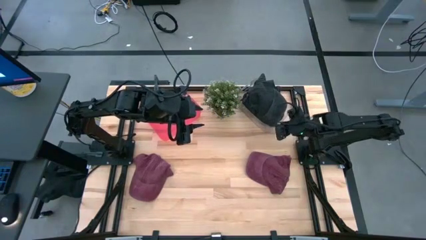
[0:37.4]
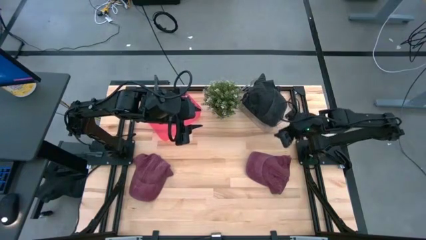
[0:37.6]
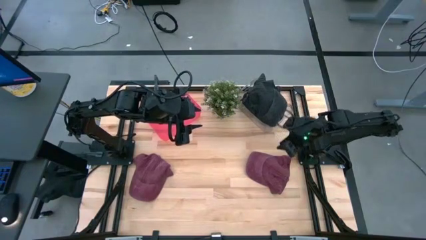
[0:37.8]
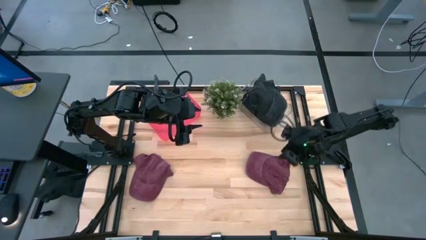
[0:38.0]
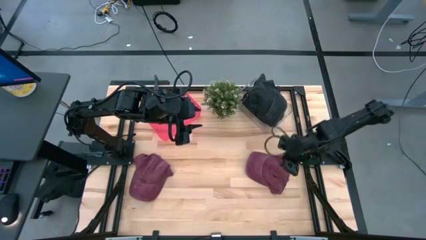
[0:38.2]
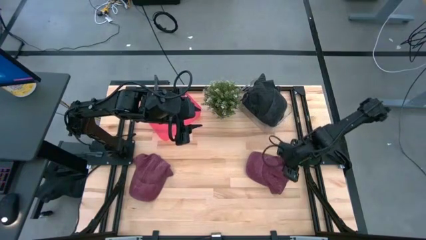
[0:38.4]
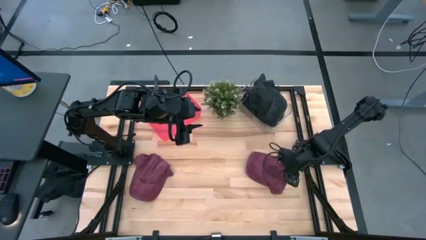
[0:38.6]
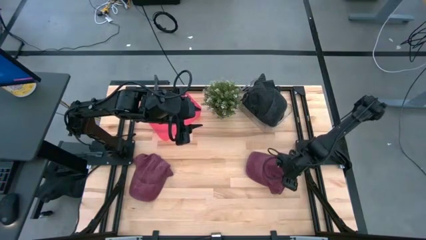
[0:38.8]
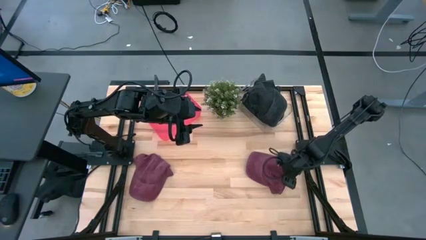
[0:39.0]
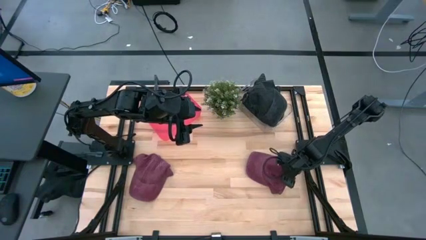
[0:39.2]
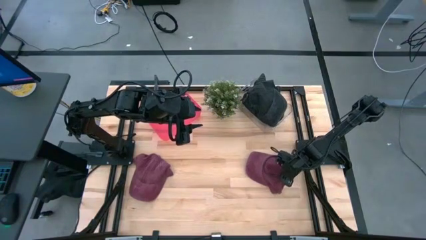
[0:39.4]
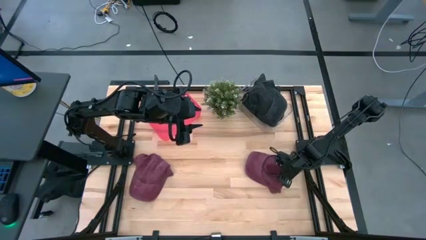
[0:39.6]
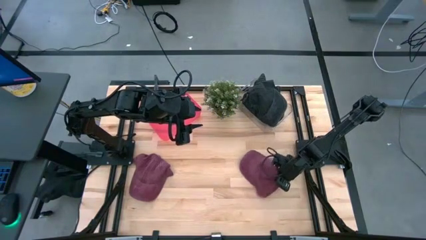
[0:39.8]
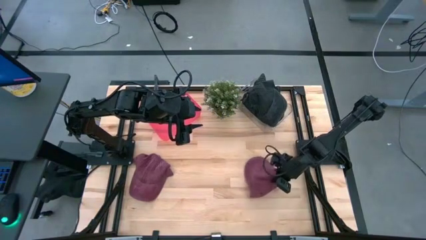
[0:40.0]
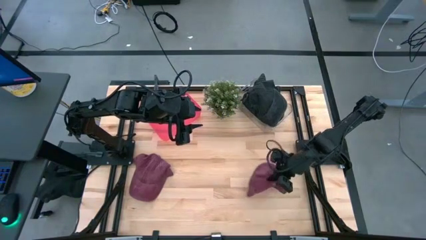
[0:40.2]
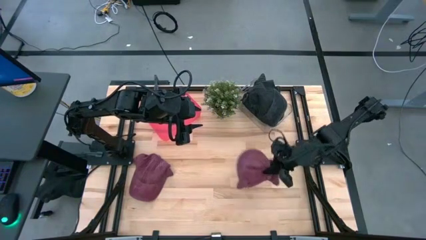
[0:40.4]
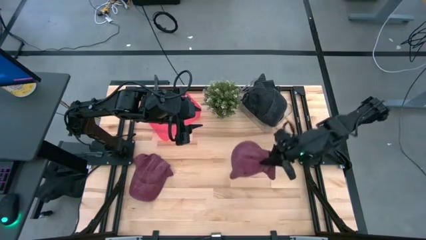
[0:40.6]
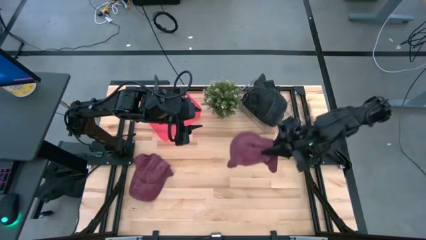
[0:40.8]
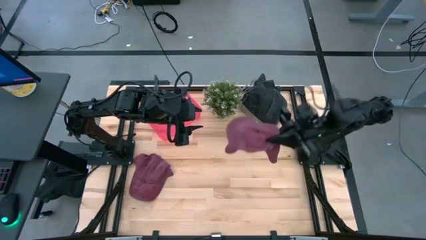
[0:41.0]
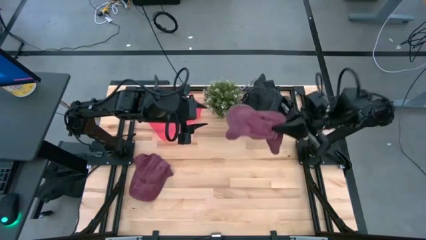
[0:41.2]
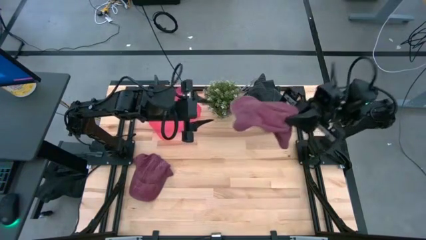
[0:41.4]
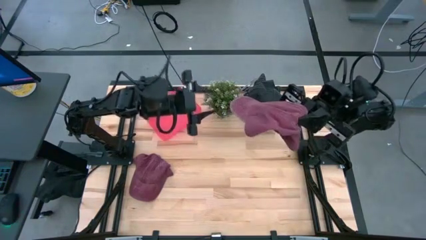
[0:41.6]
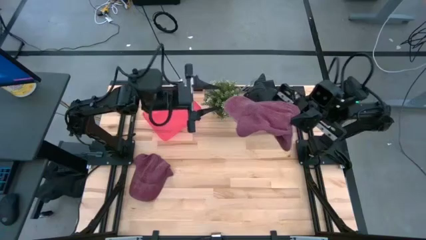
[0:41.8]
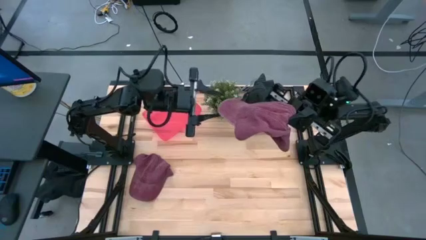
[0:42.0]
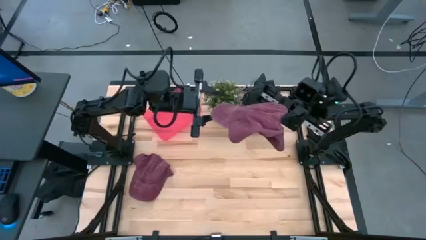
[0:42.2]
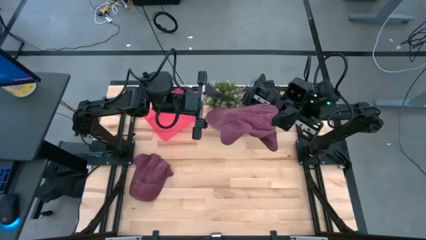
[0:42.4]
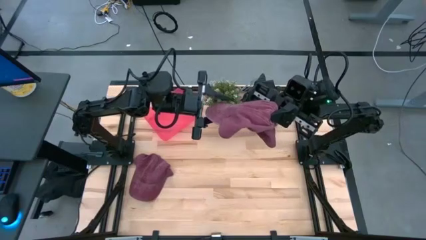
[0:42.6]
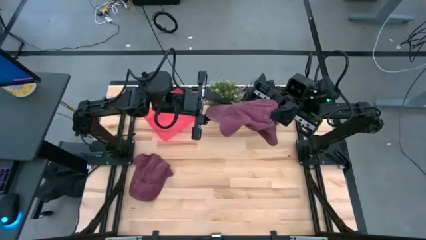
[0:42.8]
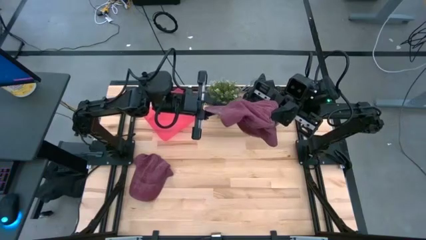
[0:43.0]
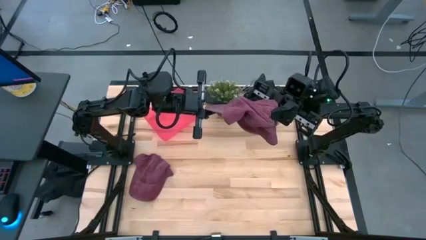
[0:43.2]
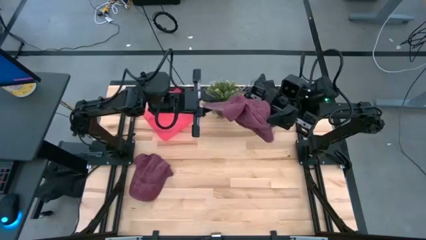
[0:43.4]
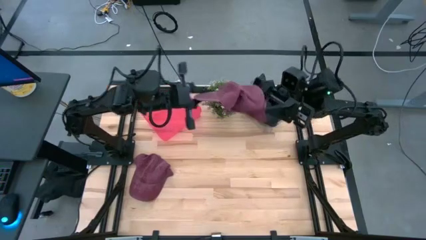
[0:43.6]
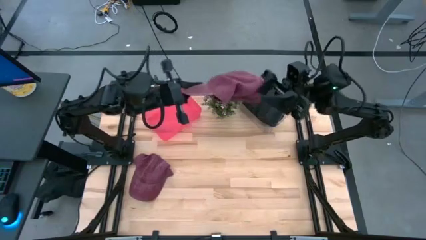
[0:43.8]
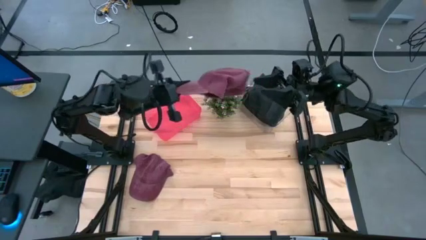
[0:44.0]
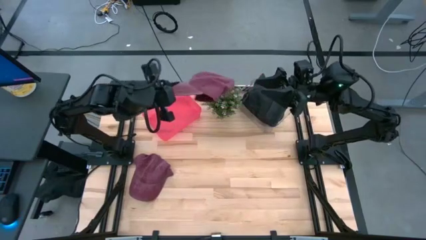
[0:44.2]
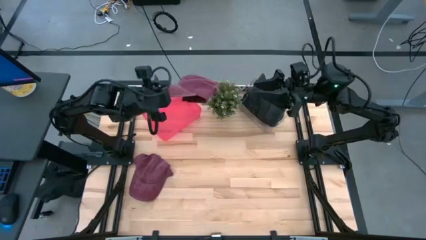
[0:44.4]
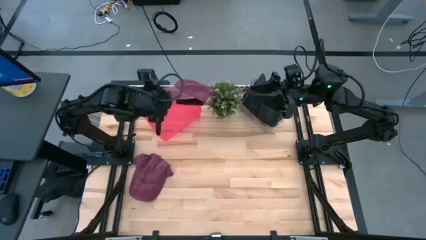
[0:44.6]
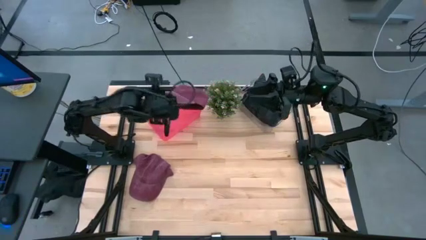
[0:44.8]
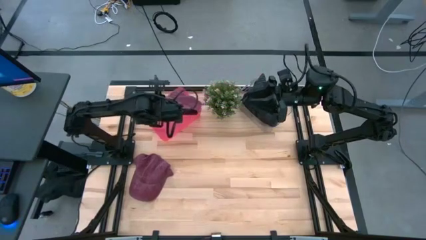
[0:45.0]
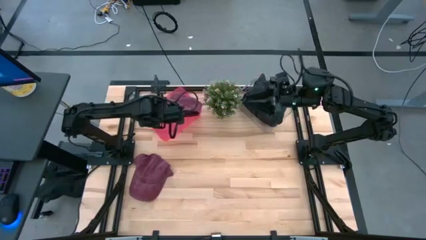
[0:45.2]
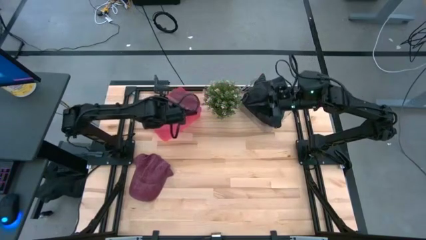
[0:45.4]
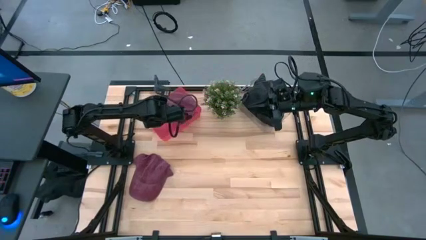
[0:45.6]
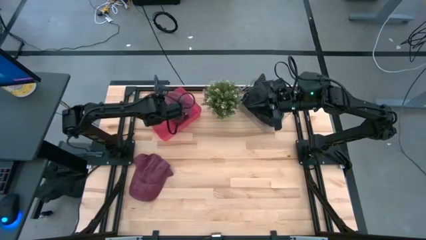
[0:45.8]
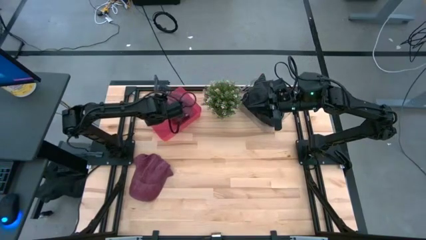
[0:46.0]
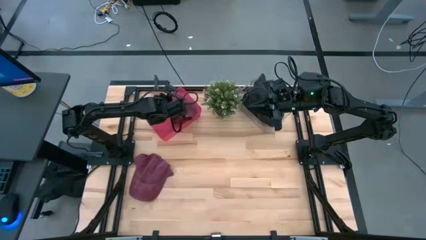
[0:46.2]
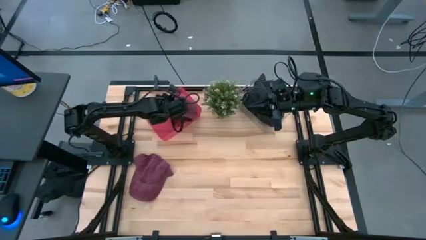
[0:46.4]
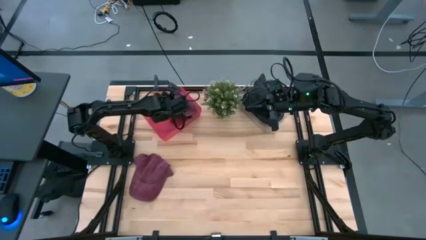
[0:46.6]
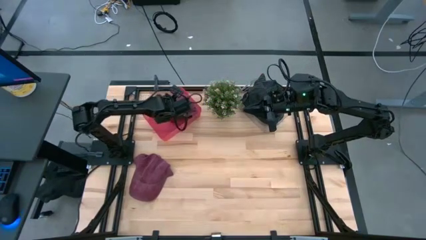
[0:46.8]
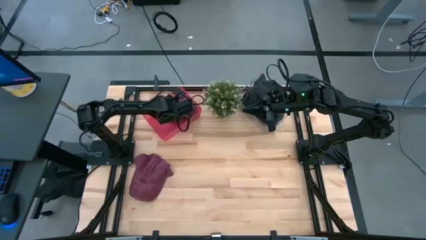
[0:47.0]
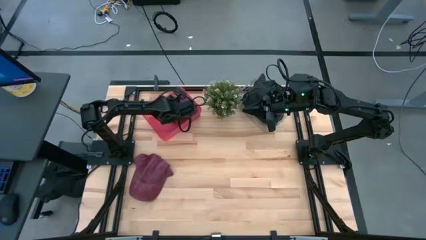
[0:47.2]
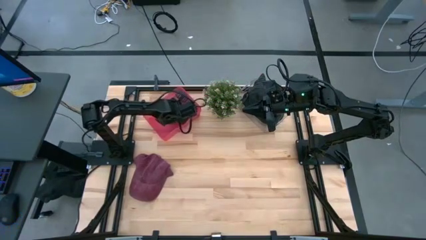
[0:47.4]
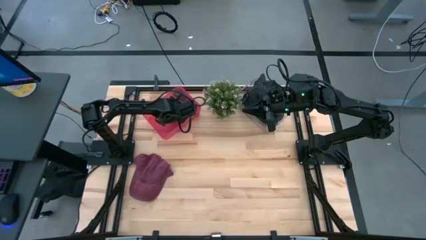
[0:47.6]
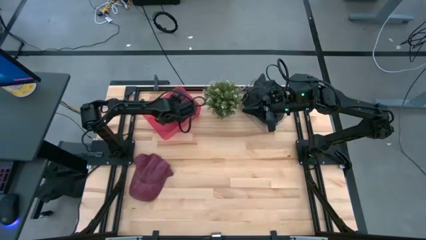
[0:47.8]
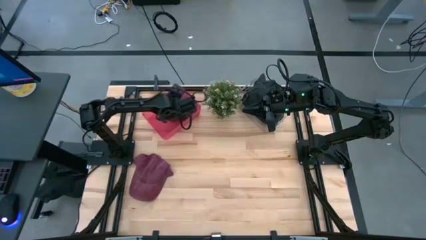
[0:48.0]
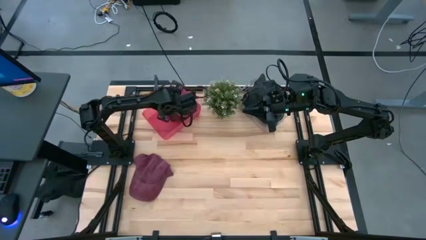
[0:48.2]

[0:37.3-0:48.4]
Task: Pick & Place hat
Put the right red cap into the red bin
